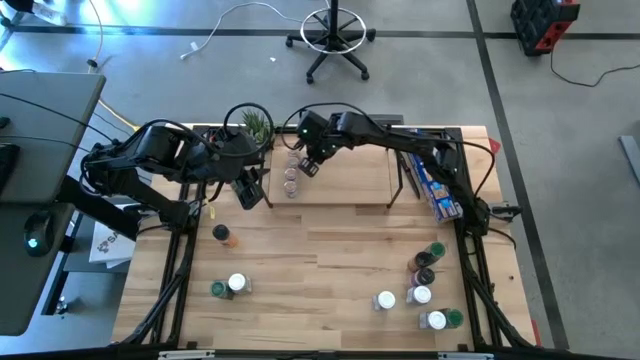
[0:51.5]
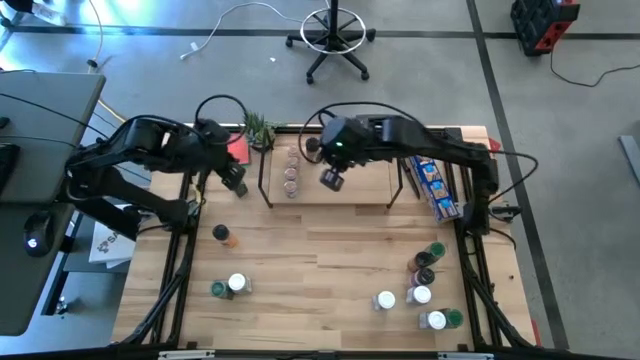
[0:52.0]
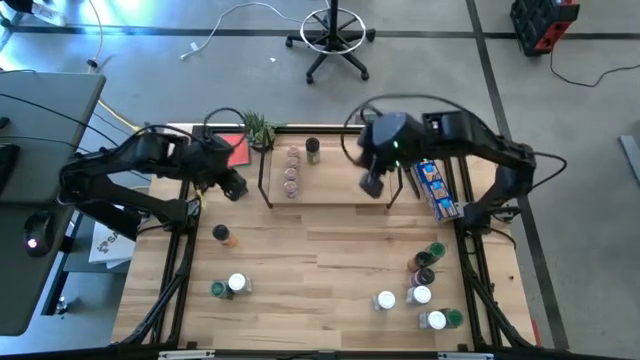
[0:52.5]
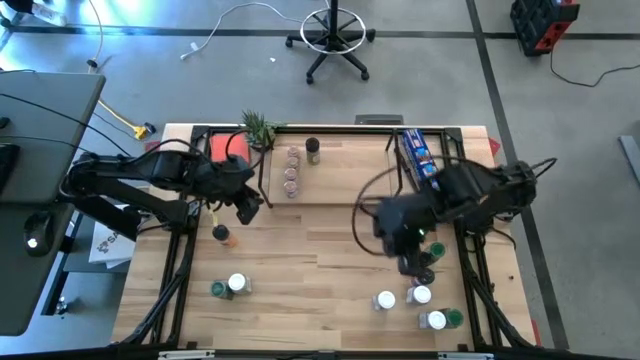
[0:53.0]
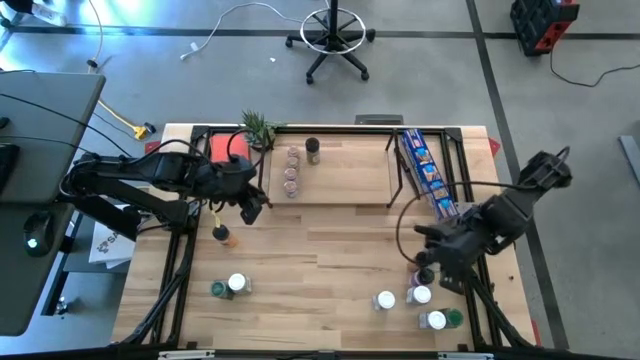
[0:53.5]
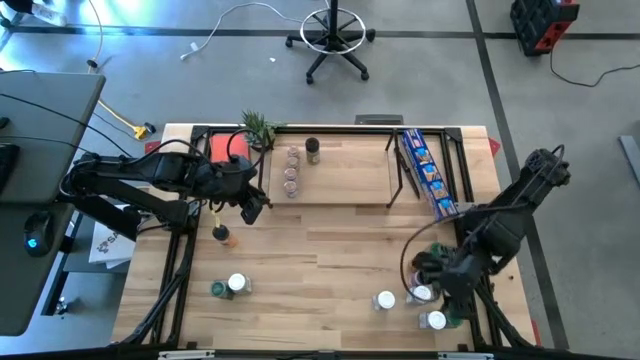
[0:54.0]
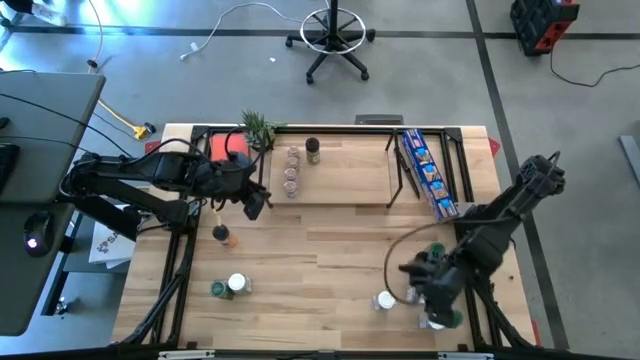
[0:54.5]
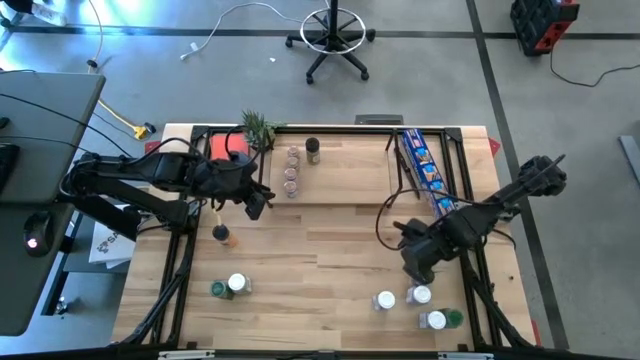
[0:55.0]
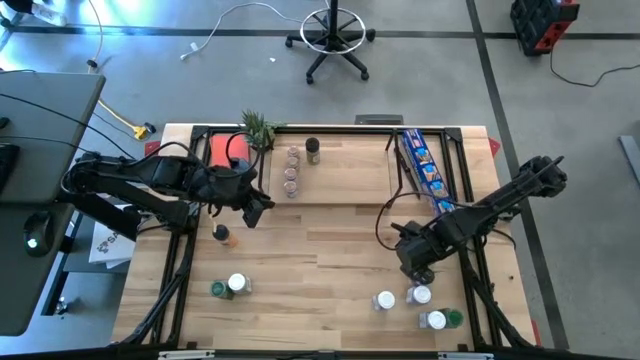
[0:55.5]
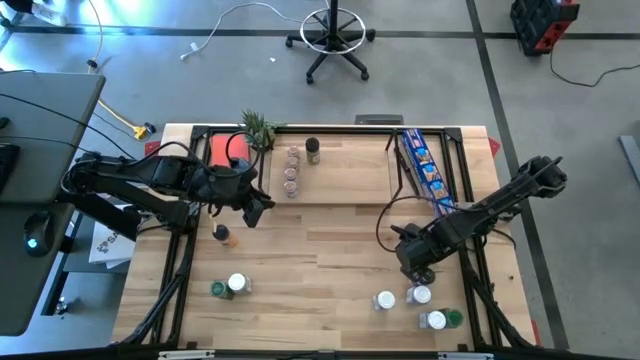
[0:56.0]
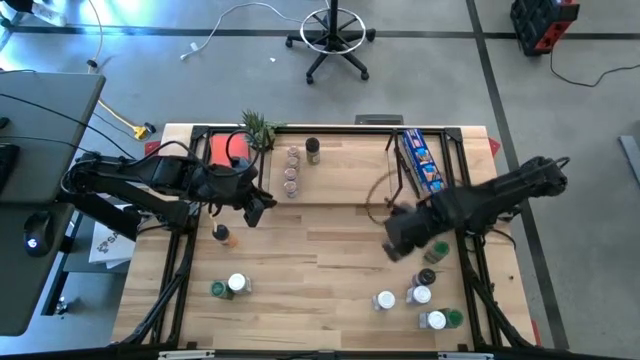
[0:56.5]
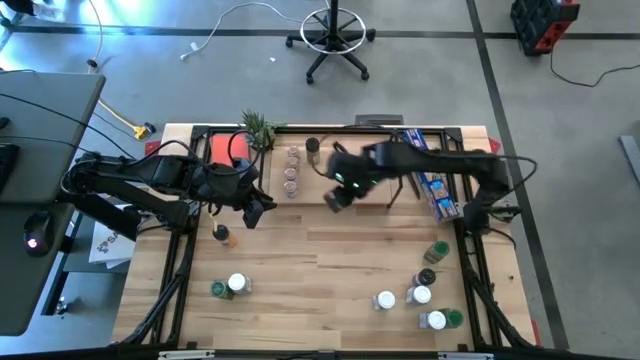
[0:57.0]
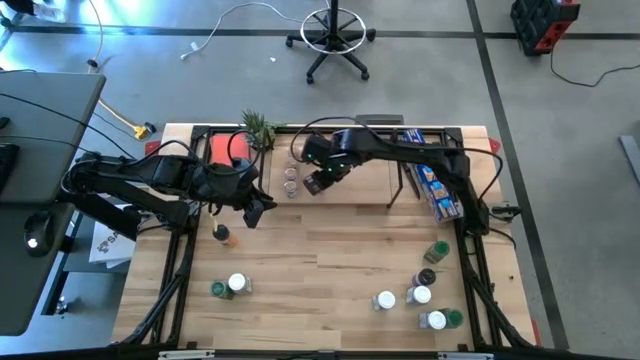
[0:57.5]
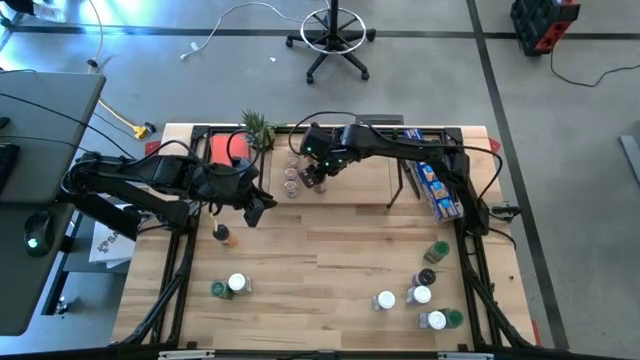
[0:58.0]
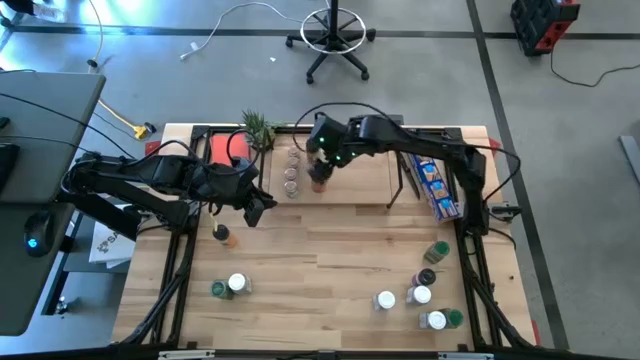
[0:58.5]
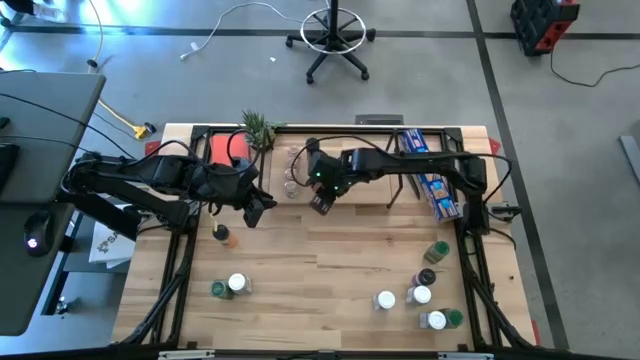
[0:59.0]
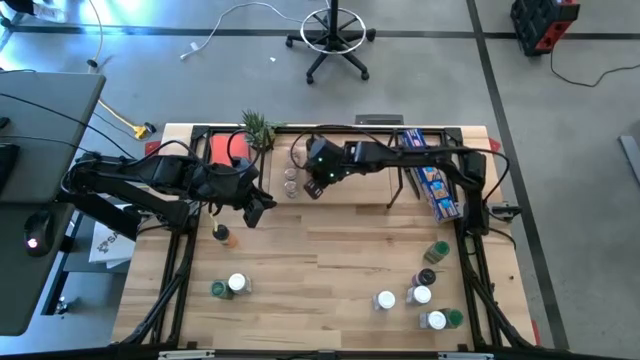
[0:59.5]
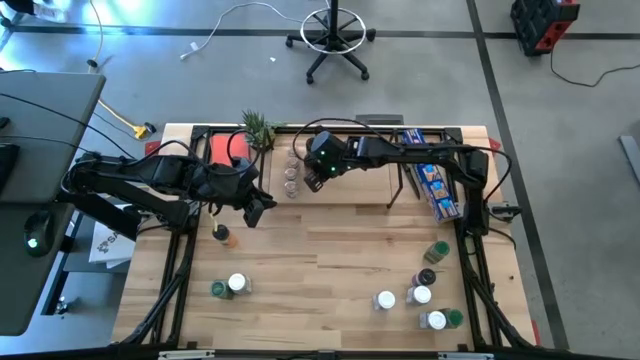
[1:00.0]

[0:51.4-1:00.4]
Task: Shelf spices
Put the black seasoning bottle aligned with the other black seasoning bottle on the shelf

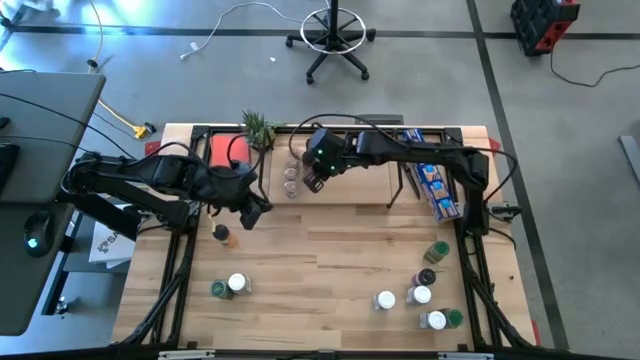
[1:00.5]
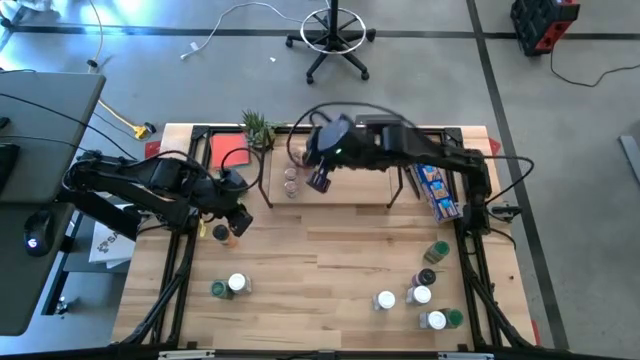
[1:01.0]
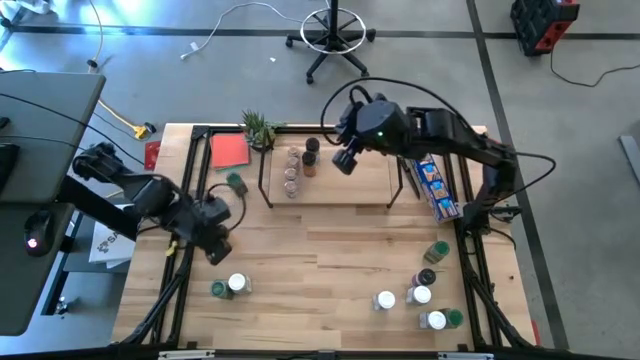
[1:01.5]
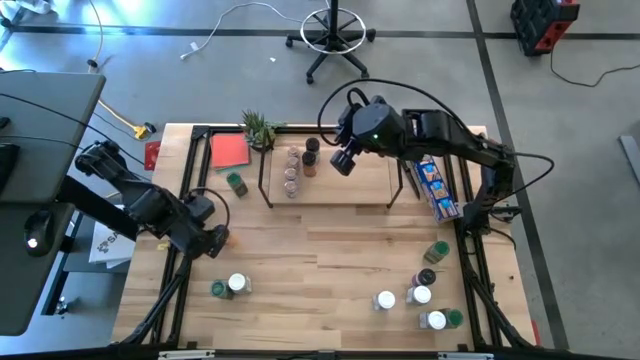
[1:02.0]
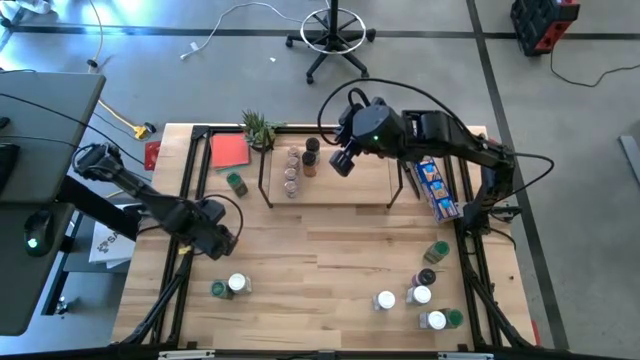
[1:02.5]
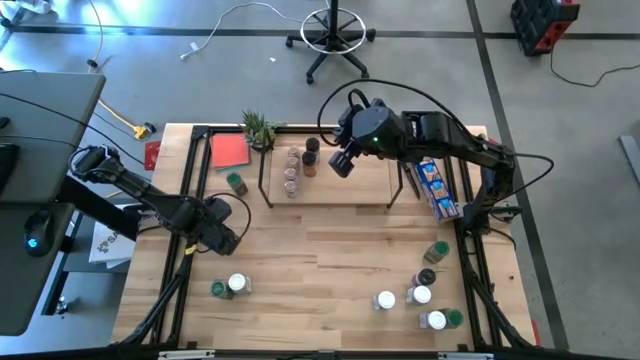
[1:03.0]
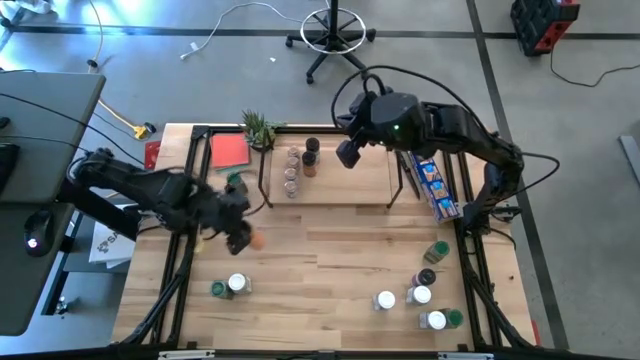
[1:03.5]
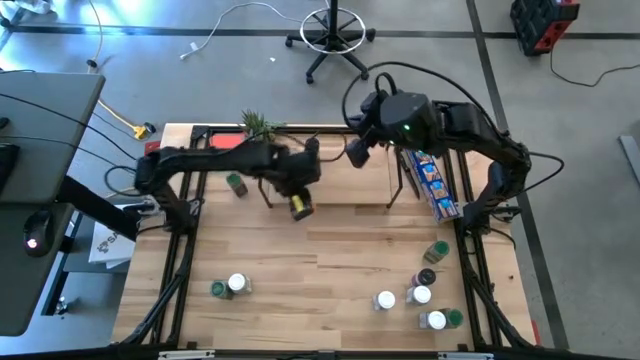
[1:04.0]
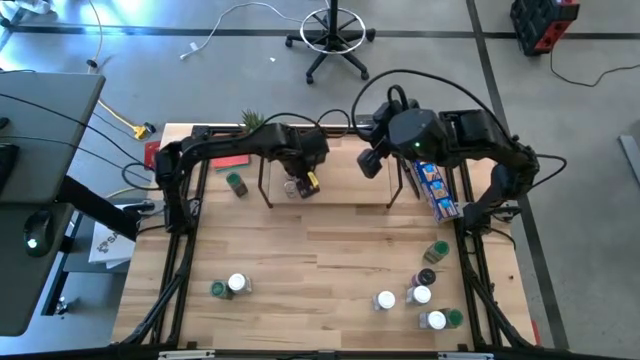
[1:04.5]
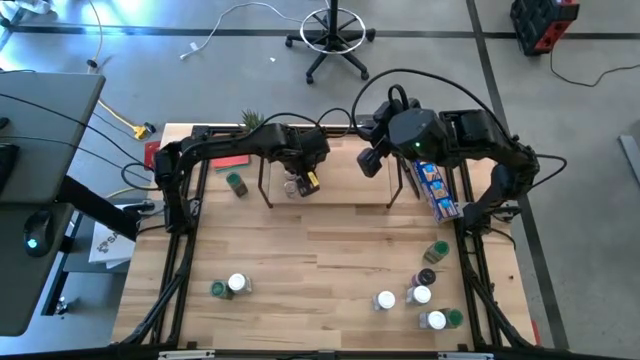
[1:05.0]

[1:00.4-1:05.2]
Put the black seasoning bottle aligned with the other black seasoning bottles on the shelf

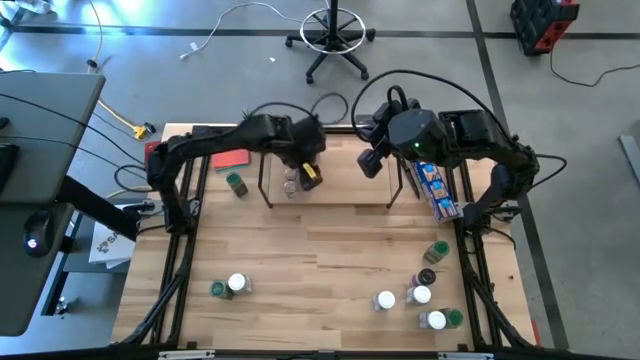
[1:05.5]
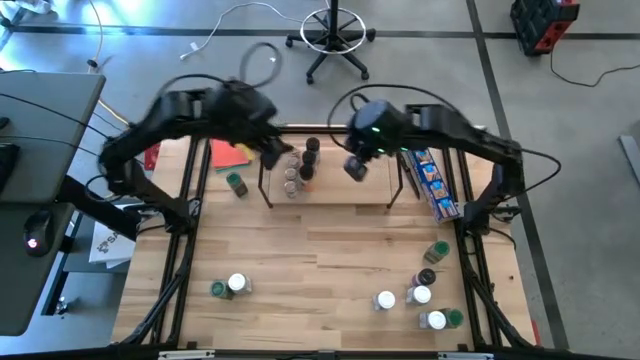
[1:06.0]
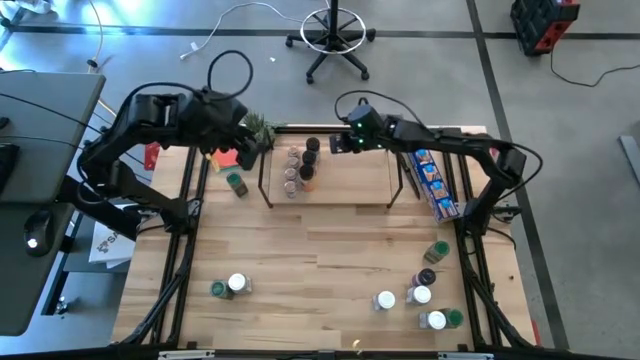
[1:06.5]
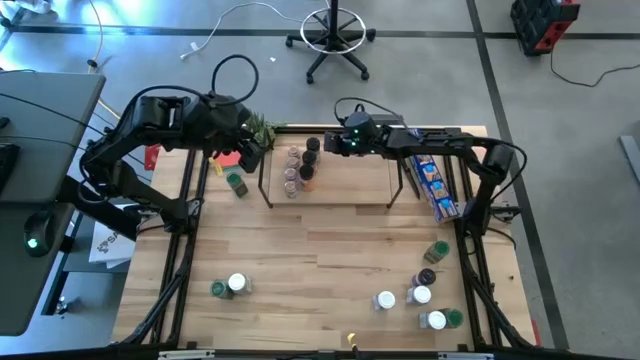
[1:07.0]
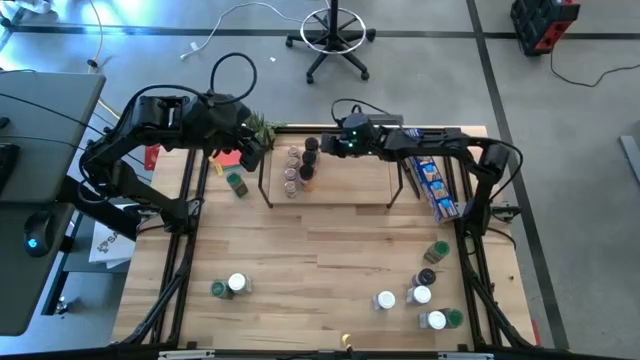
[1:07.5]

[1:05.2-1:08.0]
Adjust the black seasoning bottle on the shelf

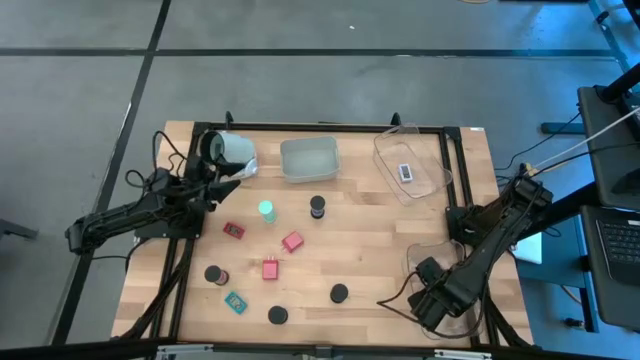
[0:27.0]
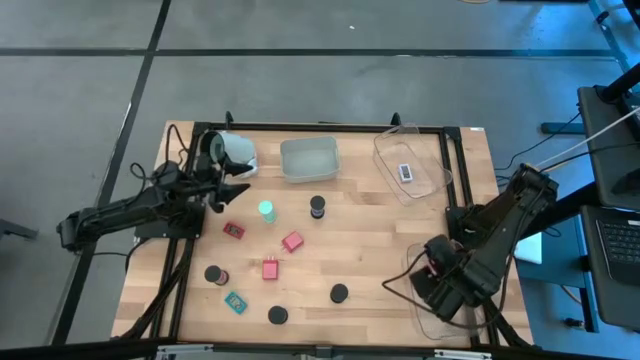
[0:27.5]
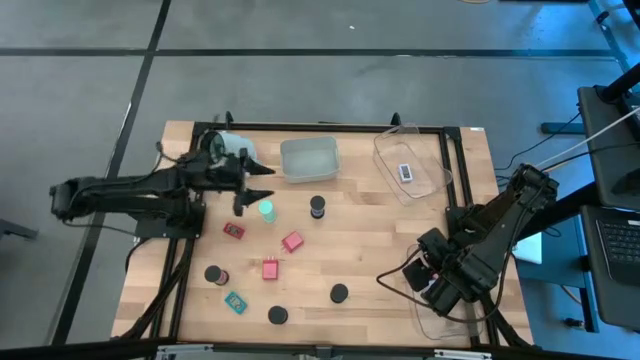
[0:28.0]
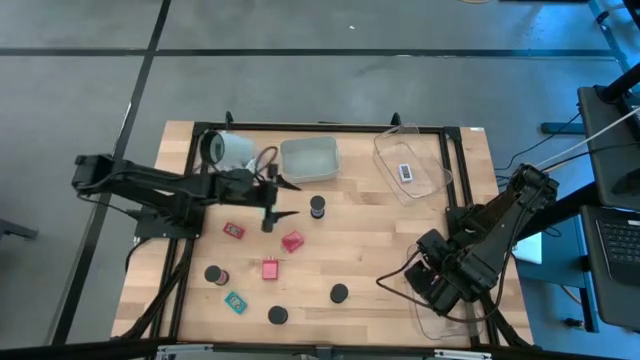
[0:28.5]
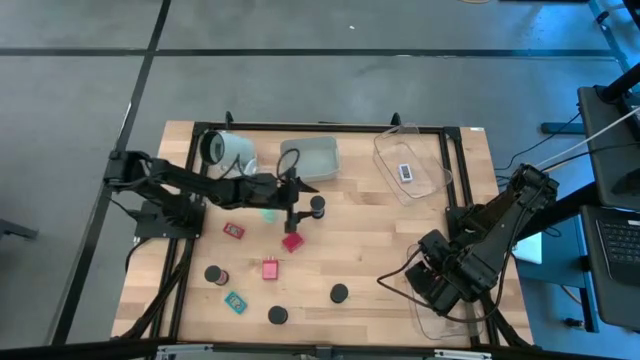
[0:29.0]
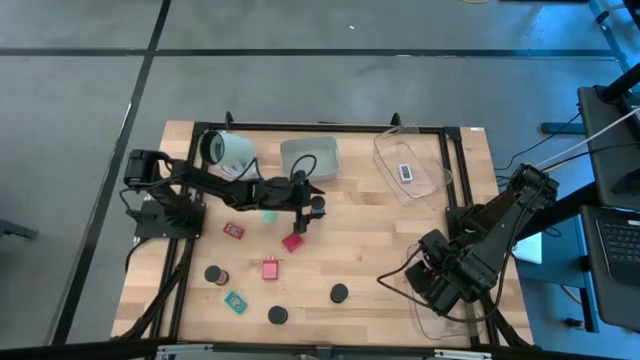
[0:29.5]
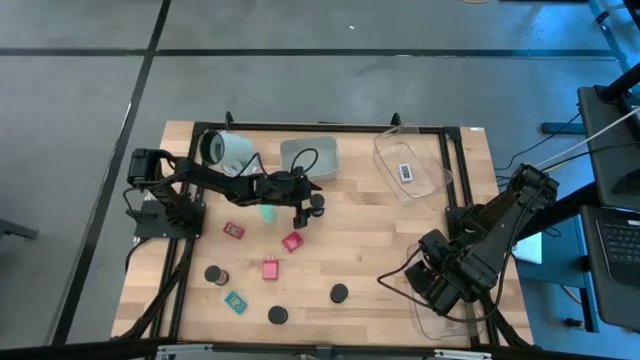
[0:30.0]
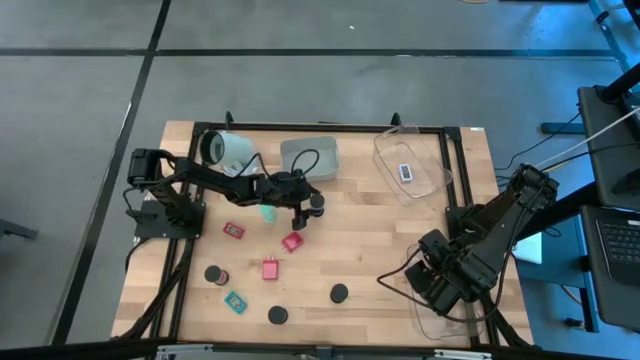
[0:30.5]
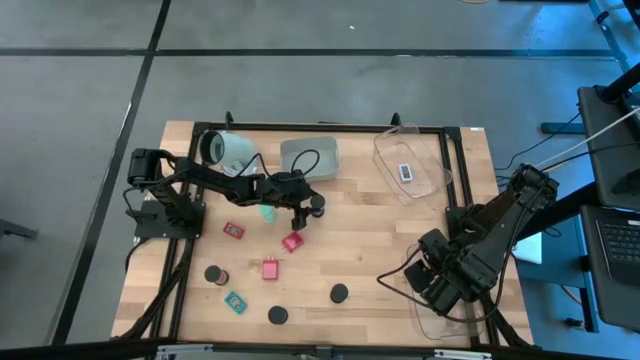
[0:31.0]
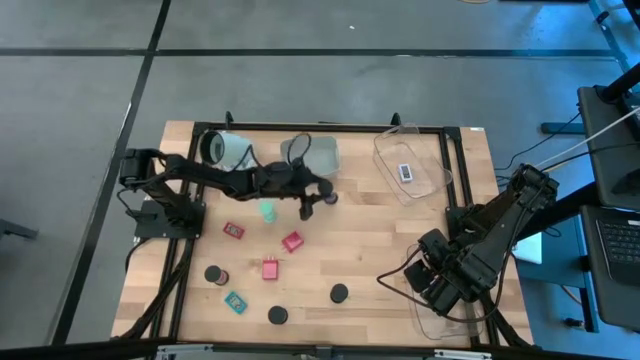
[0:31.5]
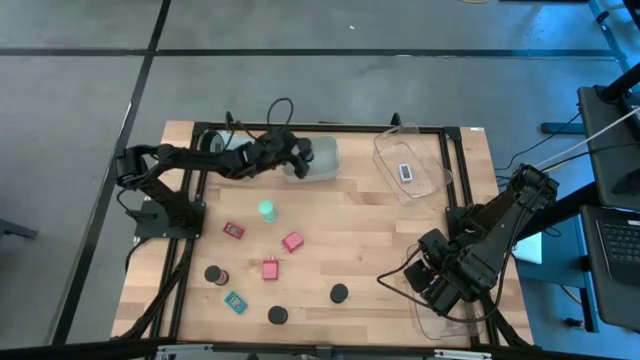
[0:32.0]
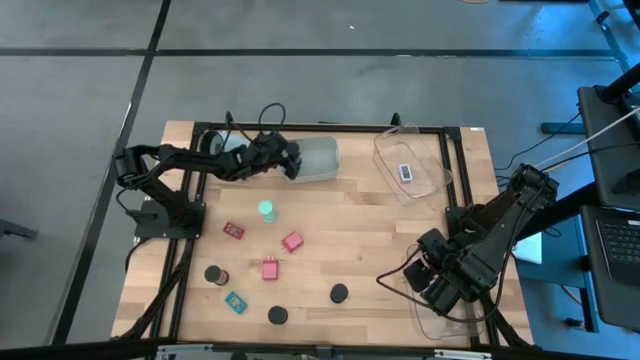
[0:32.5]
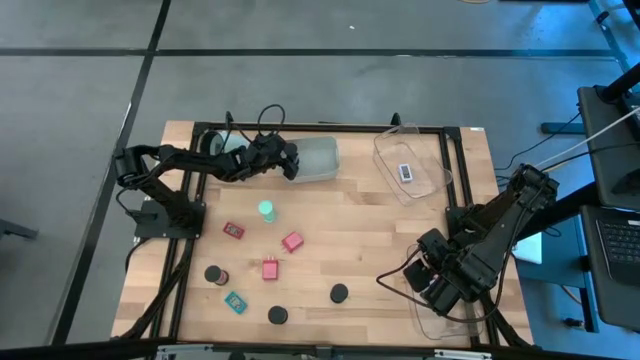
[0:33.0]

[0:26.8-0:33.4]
Task: Pick & Place Office items
Put the top blue hourglass into the gray bin
